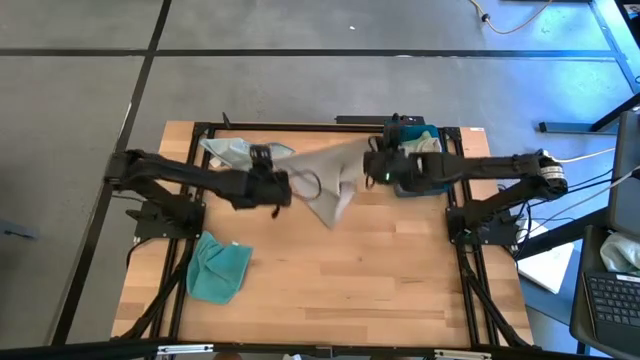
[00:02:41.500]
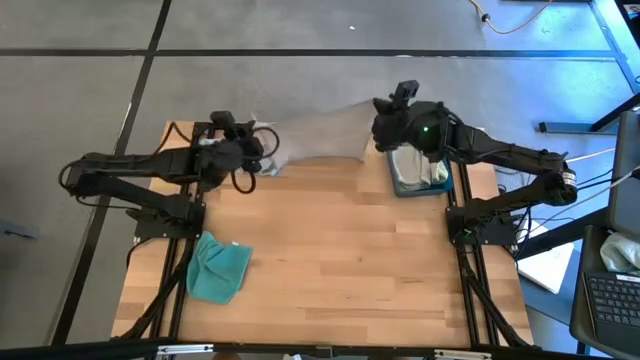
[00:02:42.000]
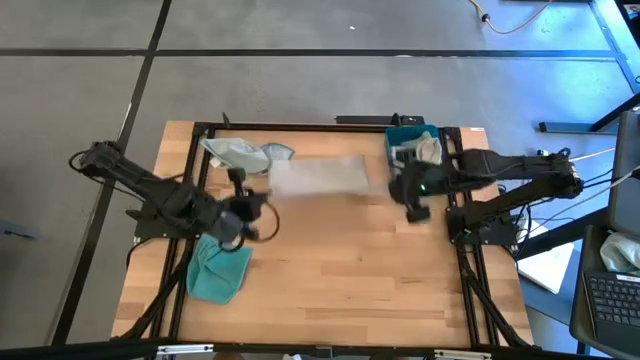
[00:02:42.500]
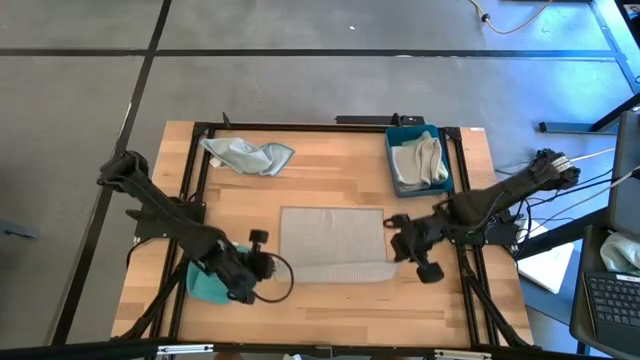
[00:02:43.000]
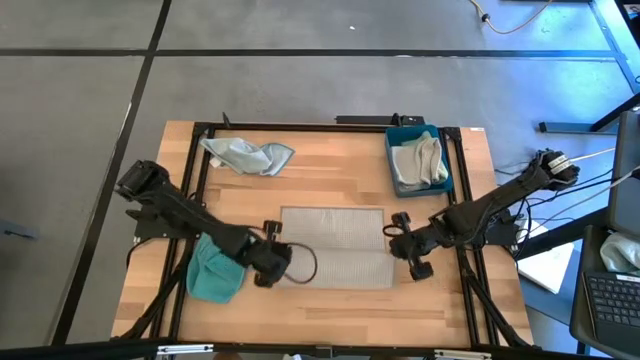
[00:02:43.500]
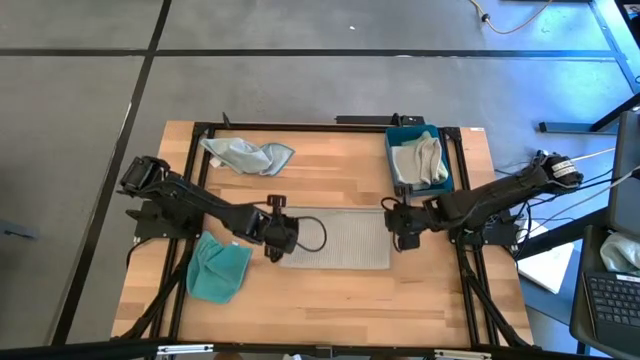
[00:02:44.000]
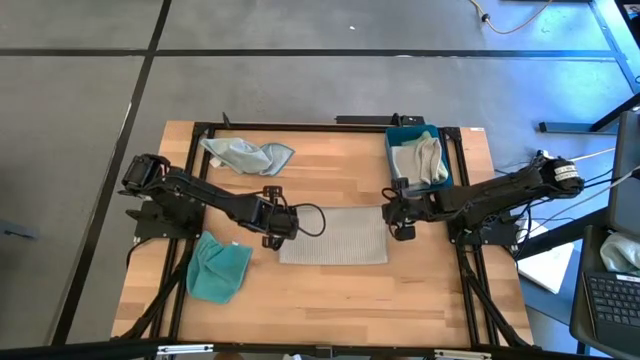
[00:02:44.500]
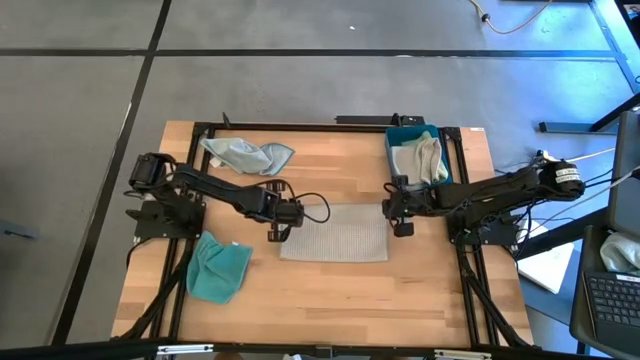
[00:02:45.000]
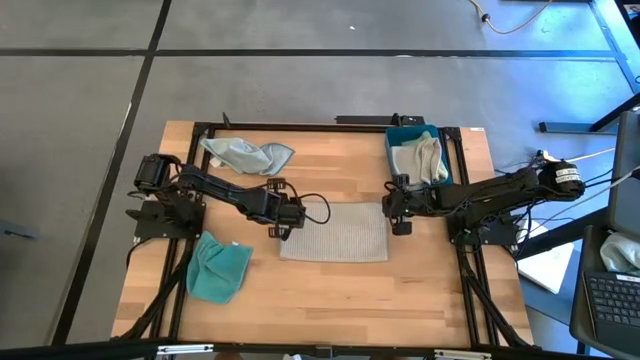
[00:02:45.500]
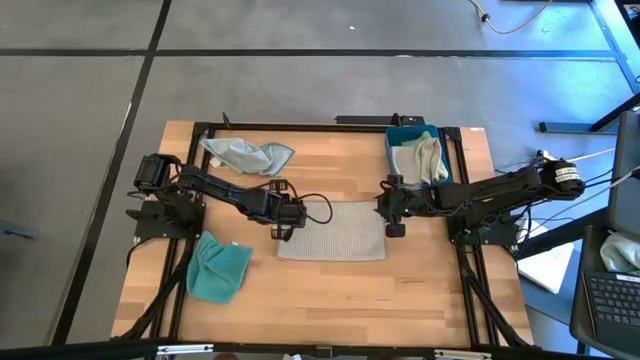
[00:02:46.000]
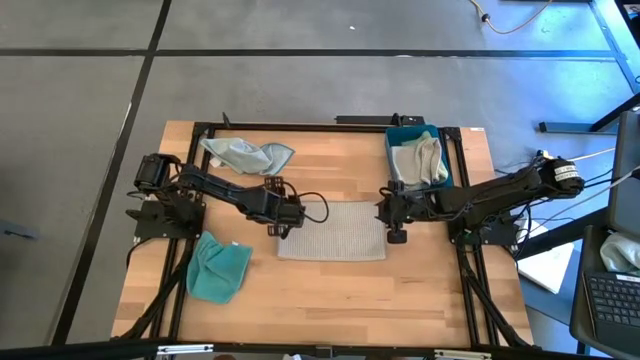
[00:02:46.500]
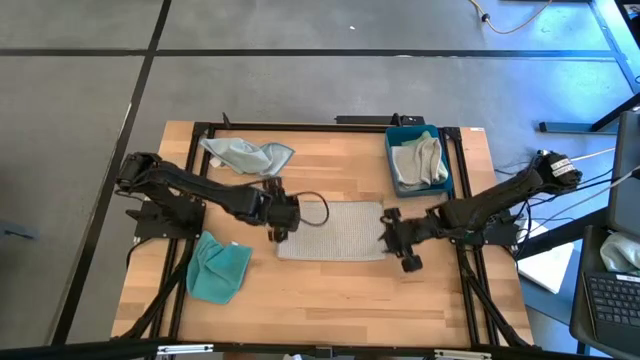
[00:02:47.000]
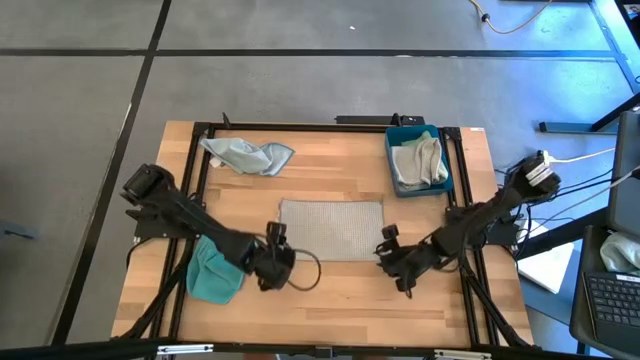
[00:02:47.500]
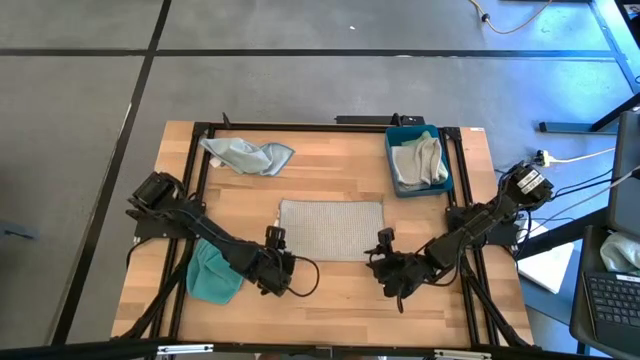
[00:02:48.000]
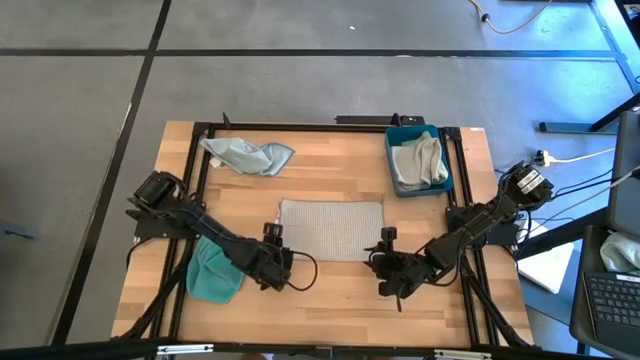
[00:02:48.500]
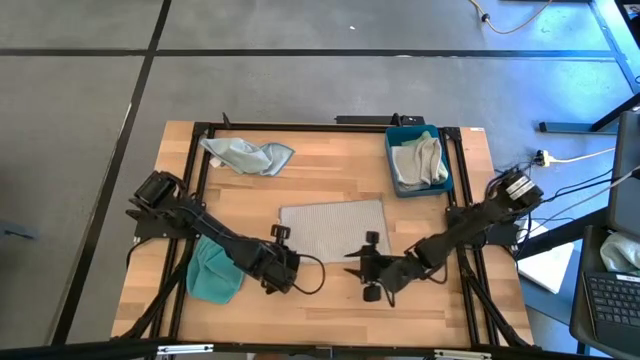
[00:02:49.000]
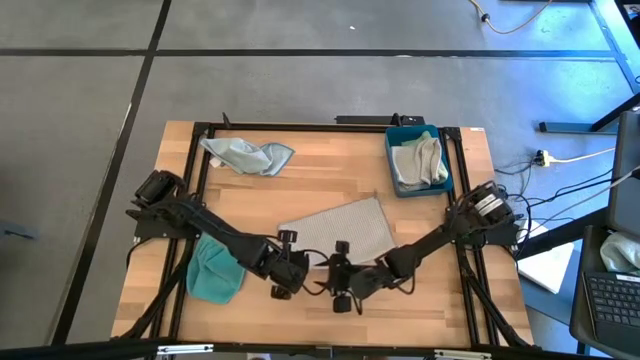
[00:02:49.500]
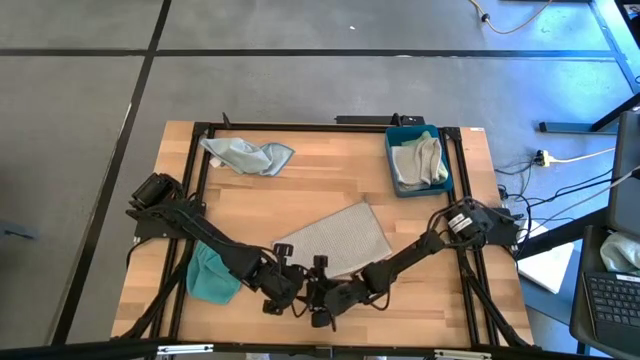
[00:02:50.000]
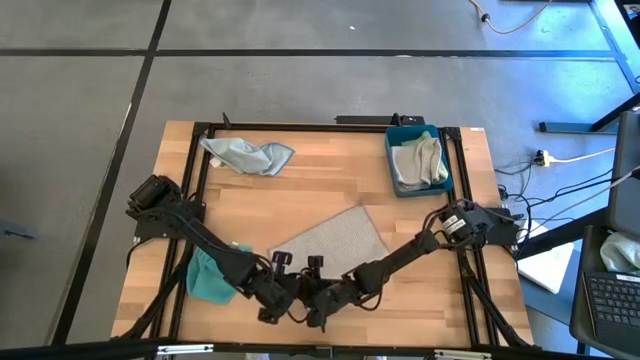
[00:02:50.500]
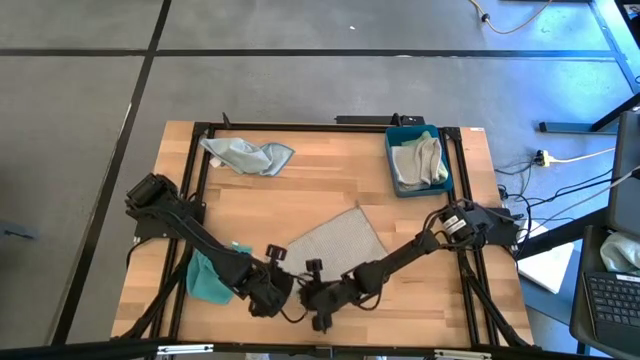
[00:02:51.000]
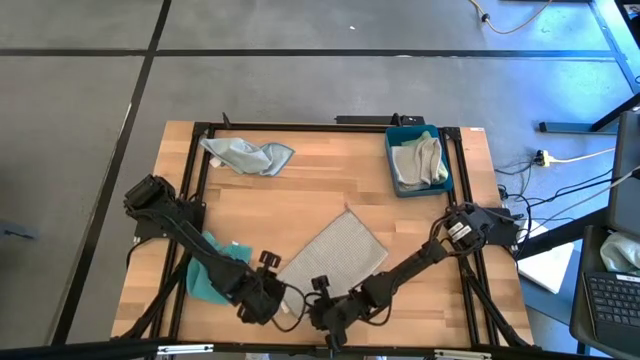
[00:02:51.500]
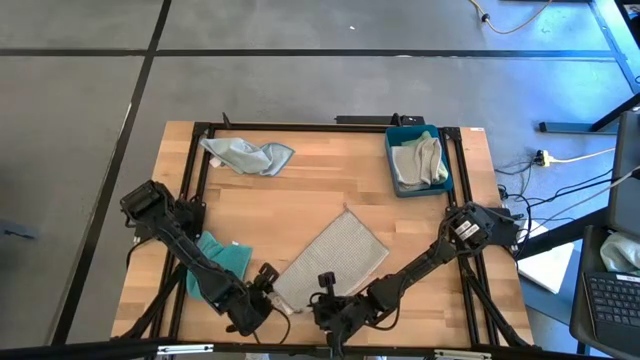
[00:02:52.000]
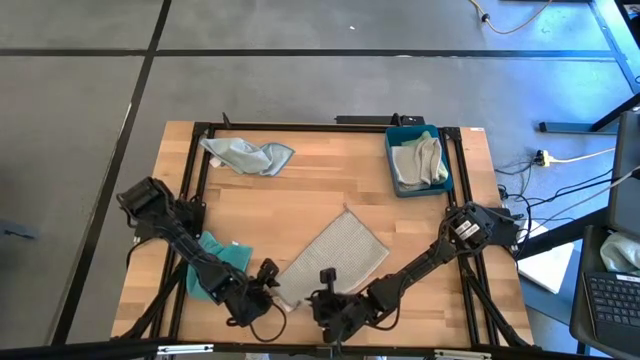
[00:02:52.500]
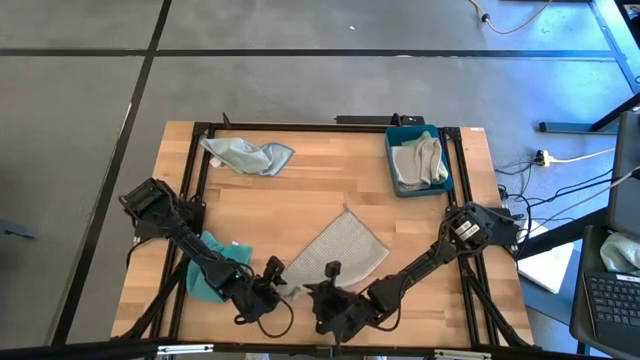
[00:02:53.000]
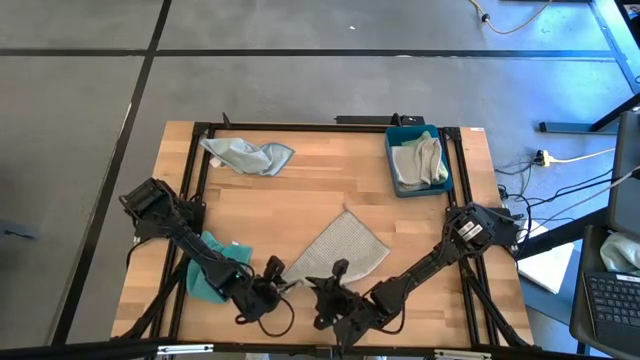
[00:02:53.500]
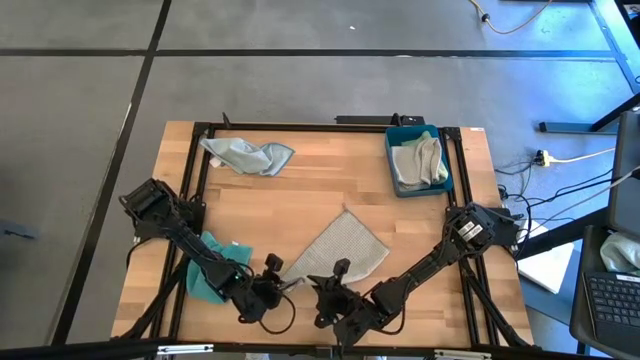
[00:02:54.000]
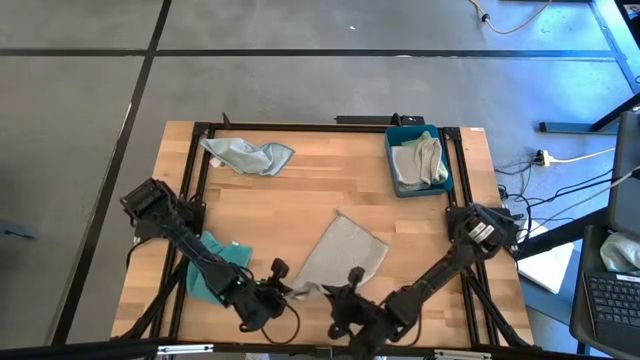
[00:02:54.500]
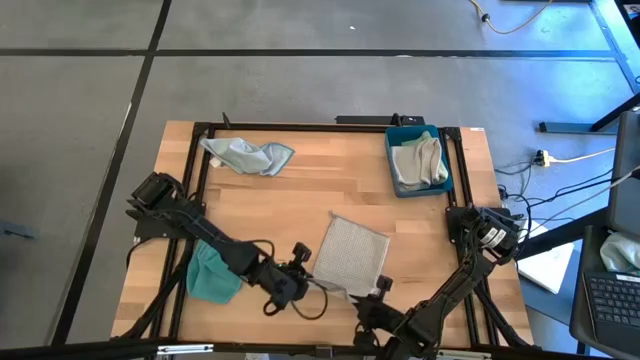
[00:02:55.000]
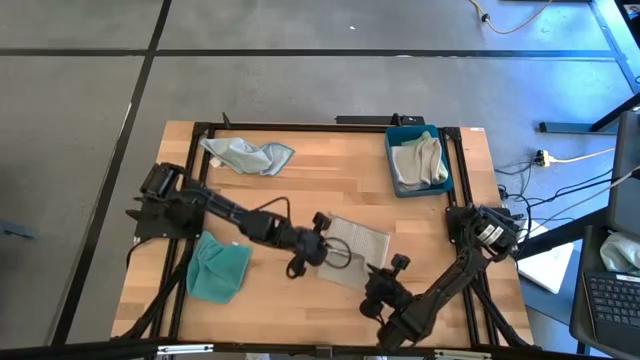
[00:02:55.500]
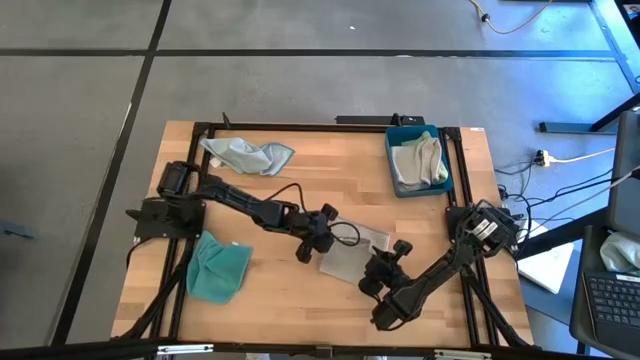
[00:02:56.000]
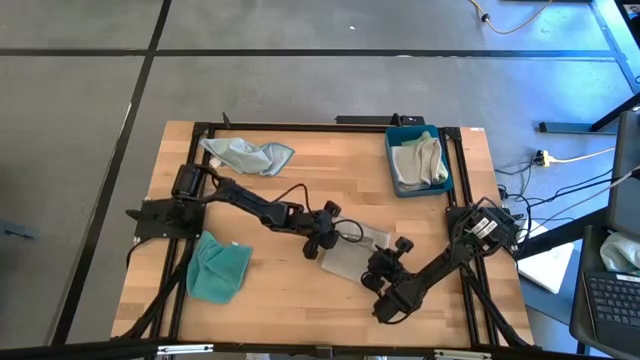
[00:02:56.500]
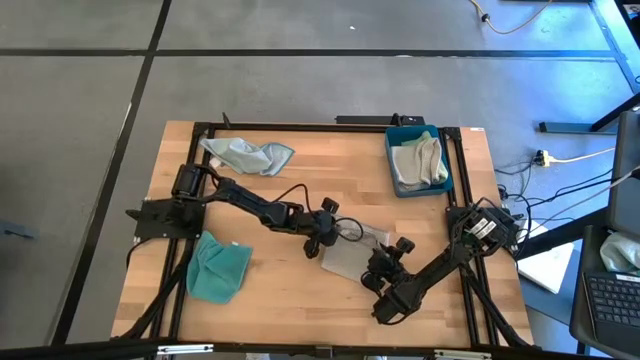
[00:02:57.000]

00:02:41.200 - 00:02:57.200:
Task: Fold microfiber towels
Fold the grey microfiber cloth

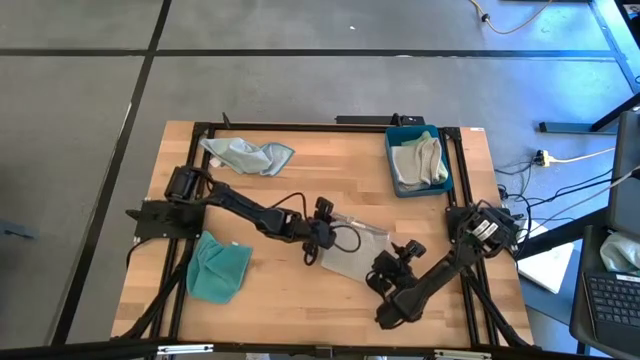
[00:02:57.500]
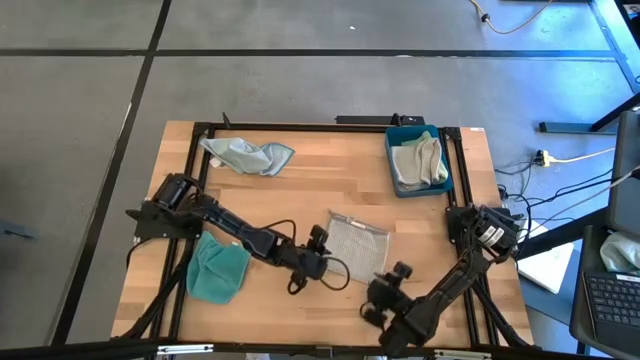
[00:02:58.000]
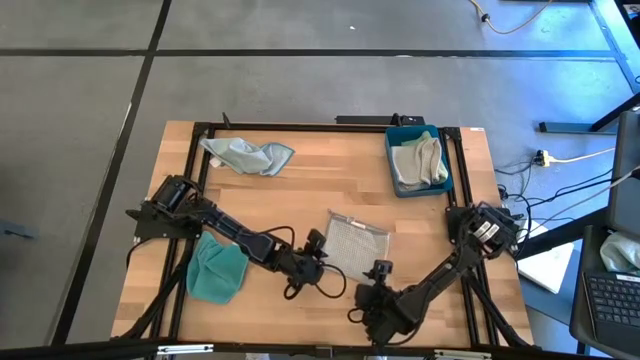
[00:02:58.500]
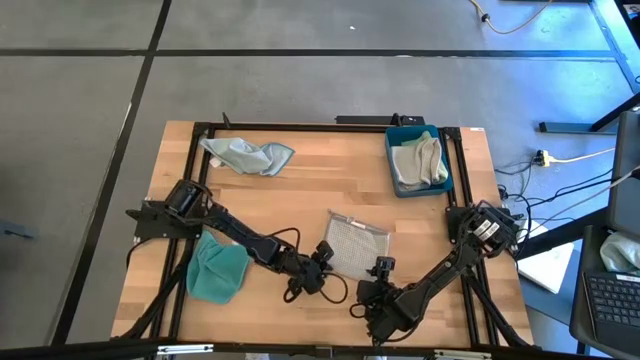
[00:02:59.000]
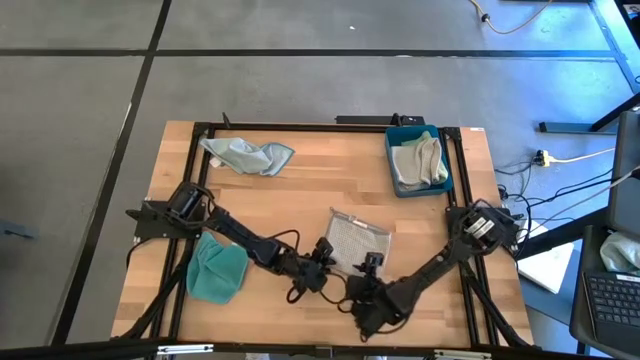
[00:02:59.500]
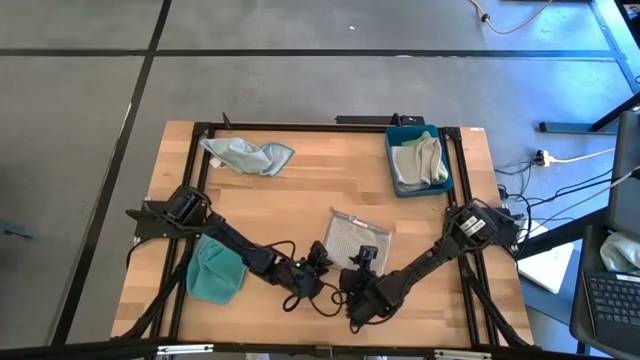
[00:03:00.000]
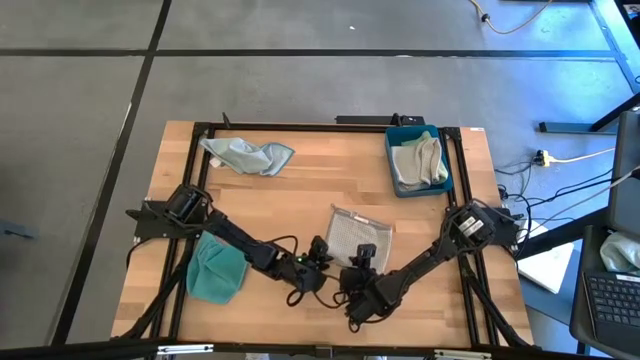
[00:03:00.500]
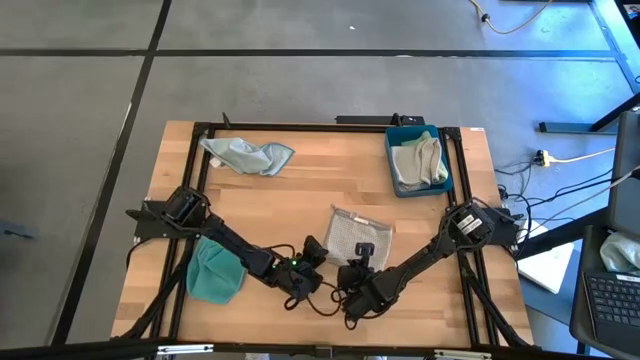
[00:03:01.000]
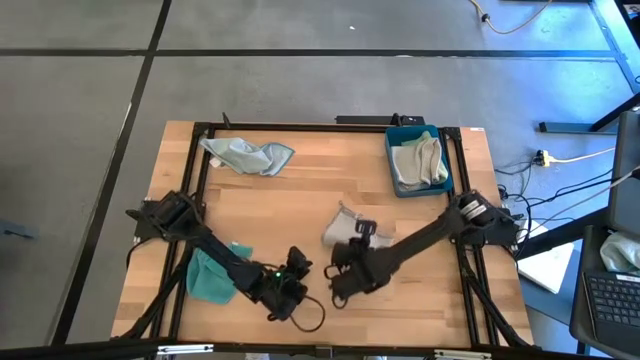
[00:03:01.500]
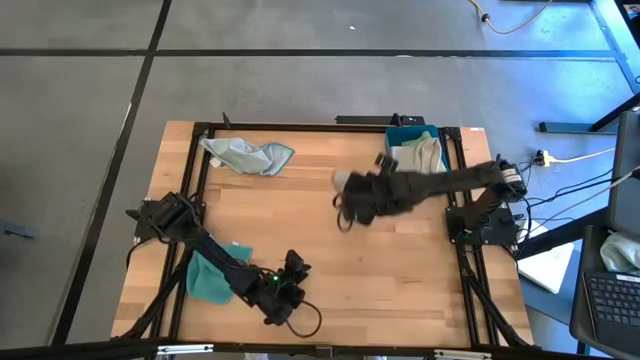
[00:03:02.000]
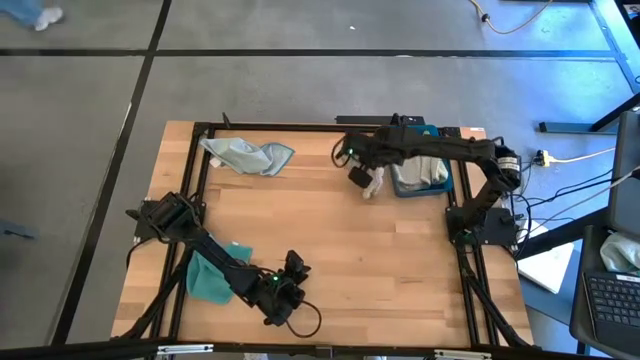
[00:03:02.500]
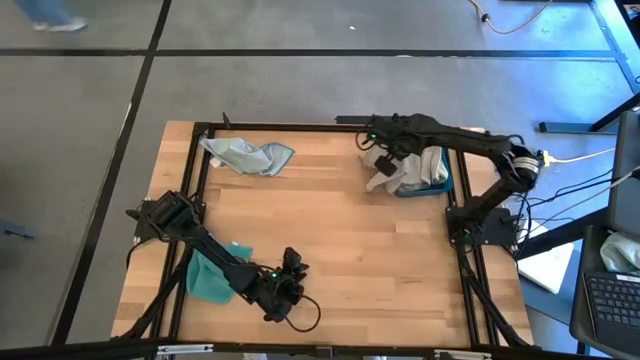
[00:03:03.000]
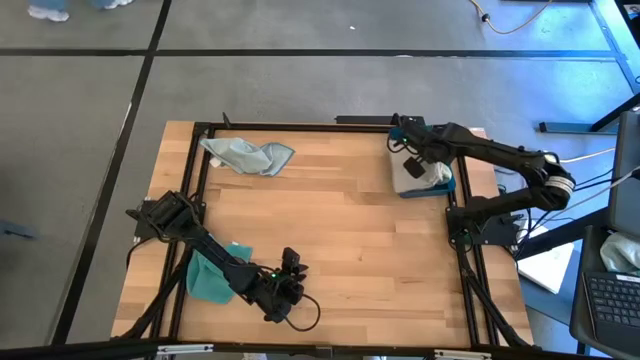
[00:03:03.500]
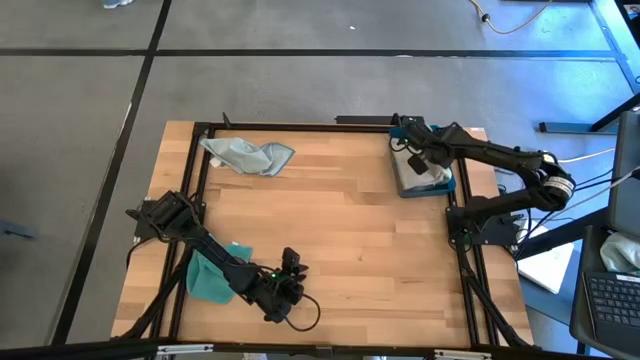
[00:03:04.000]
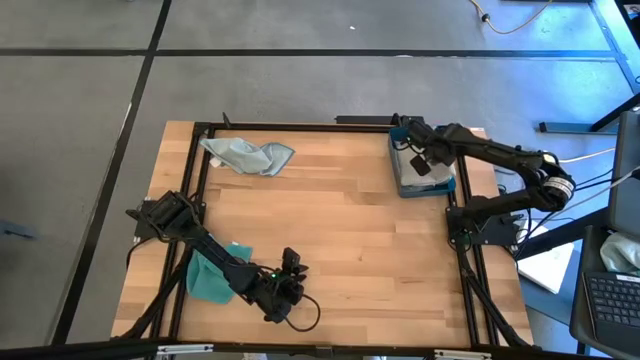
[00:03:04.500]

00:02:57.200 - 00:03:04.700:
Put the grey microfiber cloth into the blue bin
